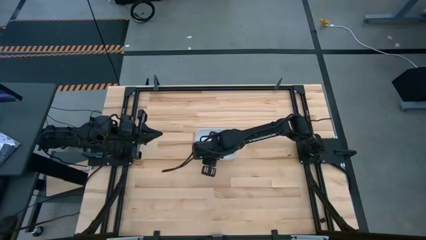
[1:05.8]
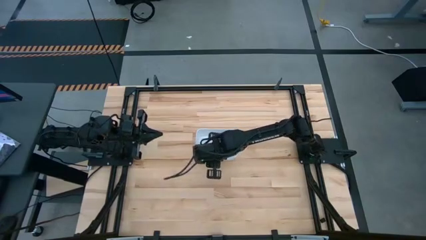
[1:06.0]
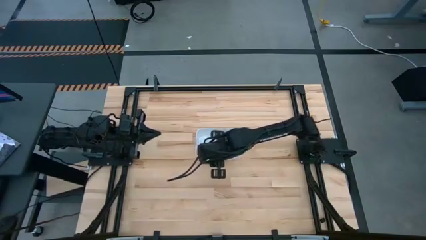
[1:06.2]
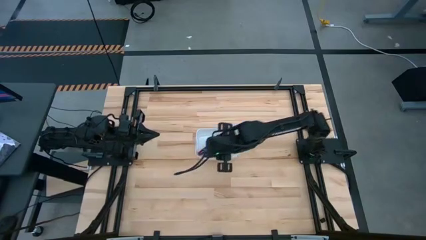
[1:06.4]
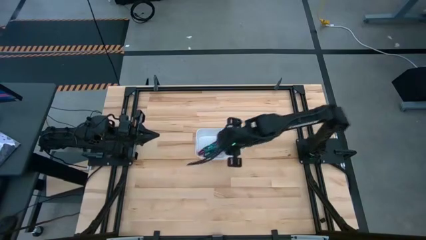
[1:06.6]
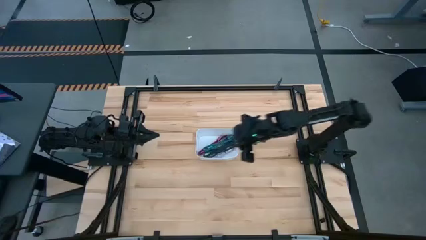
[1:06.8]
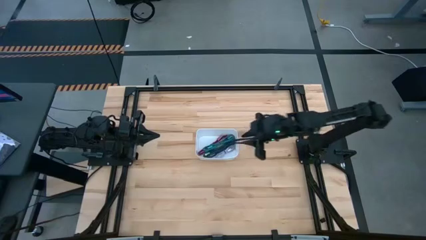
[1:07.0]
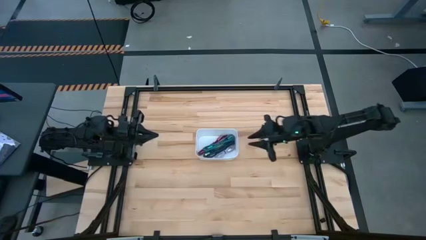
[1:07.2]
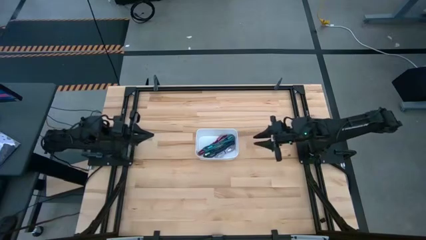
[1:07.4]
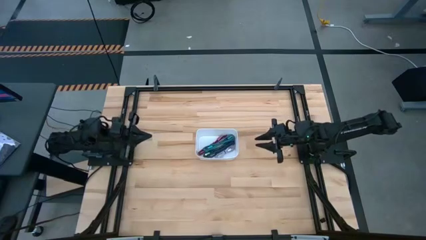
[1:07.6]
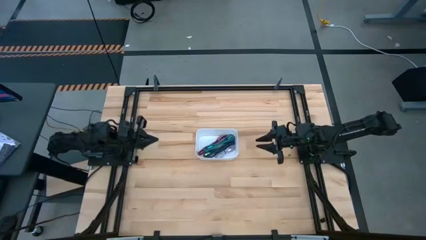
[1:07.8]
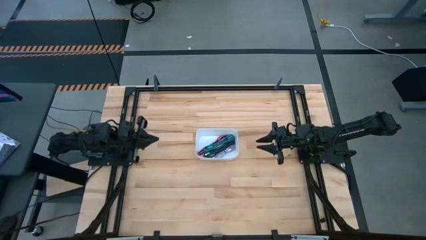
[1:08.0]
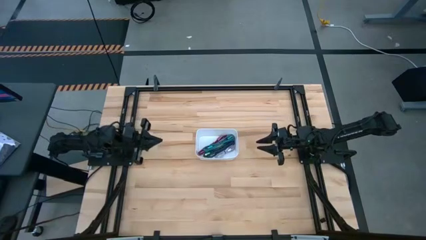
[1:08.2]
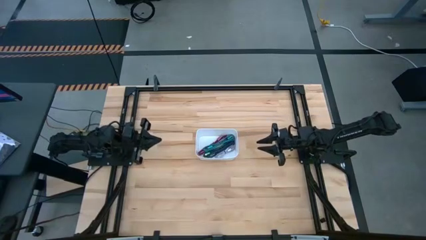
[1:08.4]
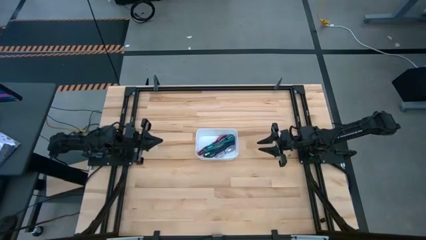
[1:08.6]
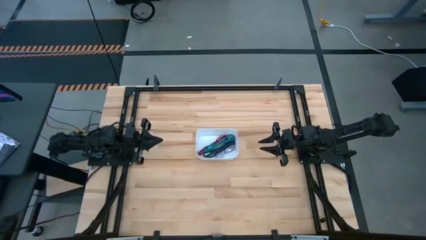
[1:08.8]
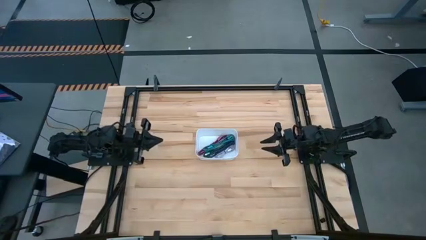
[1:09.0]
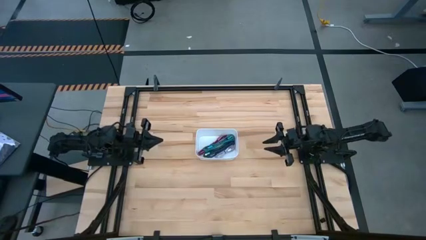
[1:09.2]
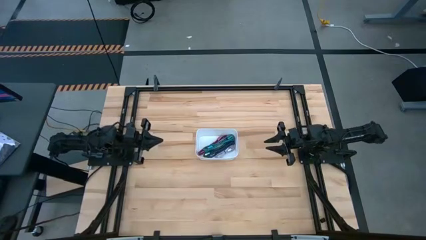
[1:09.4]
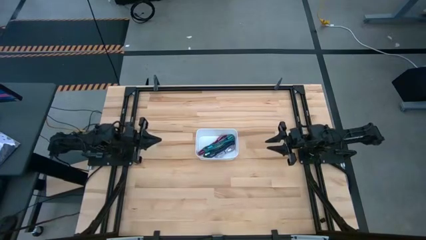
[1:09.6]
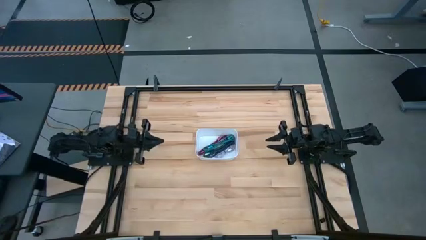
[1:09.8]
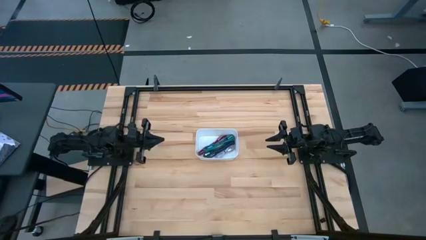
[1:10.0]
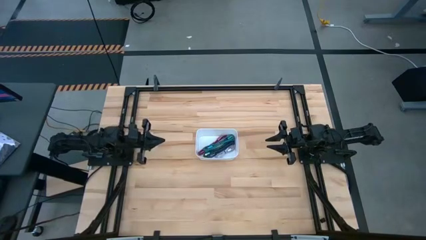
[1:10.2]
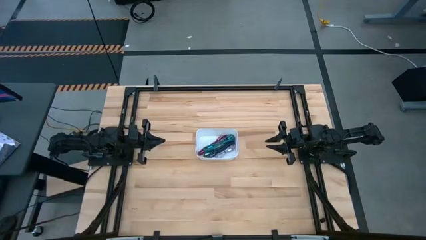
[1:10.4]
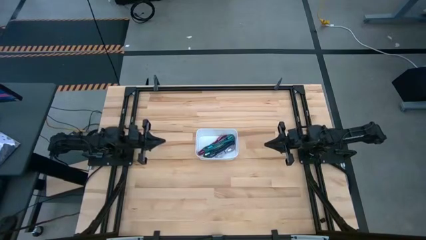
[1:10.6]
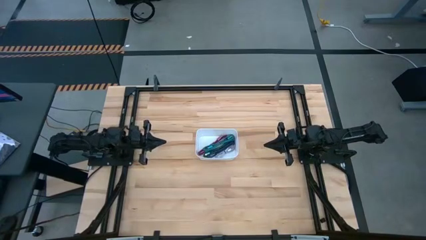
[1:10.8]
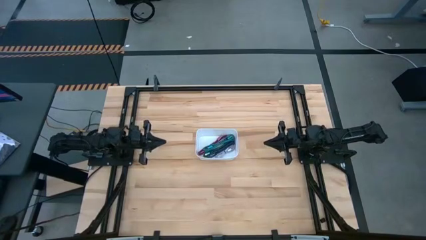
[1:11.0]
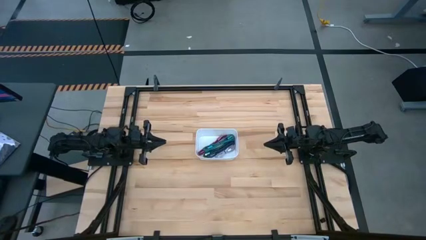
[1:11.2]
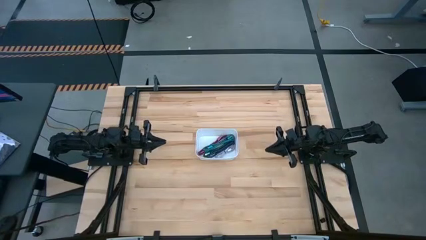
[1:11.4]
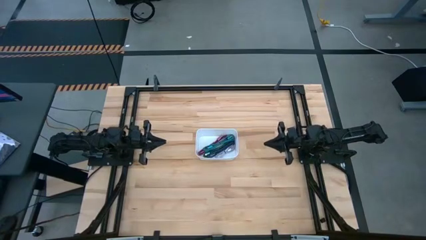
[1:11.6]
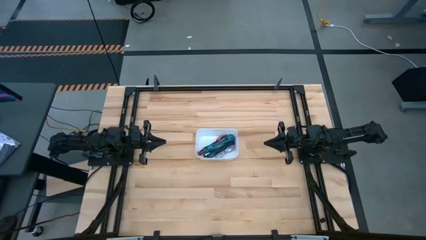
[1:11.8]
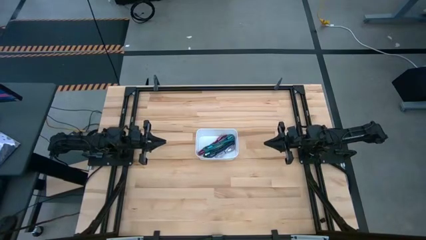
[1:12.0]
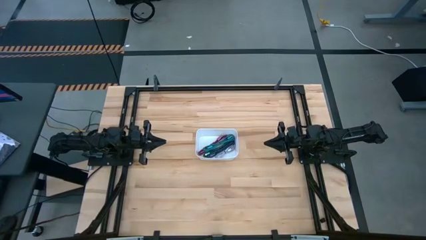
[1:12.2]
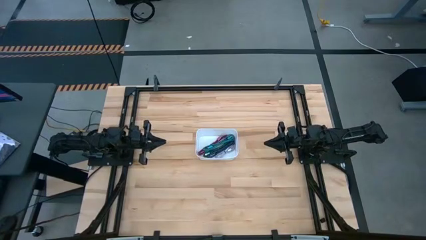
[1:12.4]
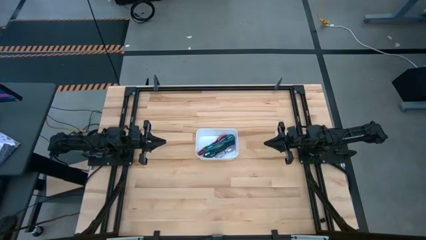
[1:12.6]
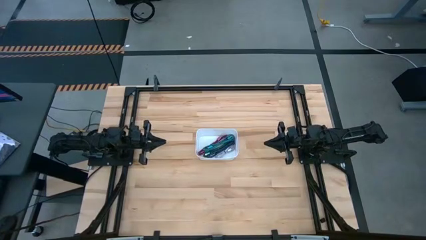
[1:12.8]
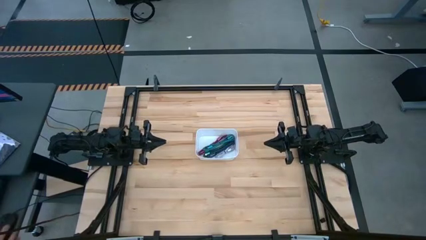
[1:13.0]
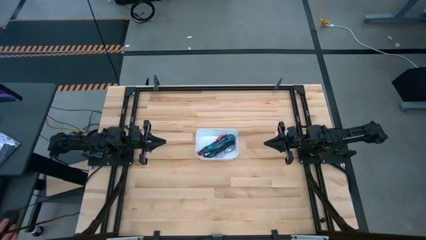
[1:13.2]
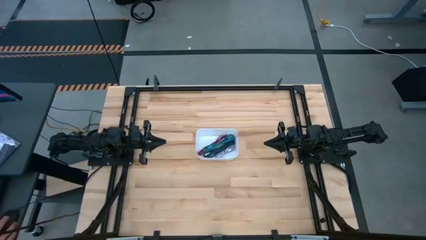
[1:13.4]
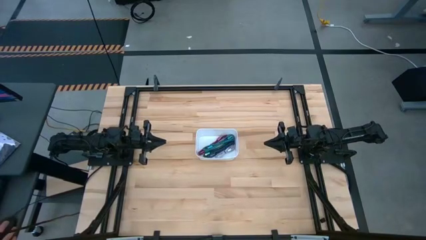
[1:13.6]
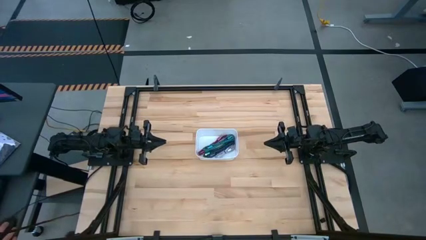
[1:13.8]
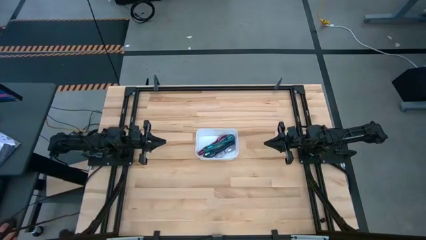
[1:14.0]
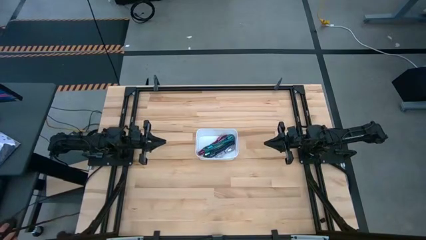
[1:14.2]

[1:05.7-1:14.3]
Task: Pick and place USB-C Cables
Return to Home Position

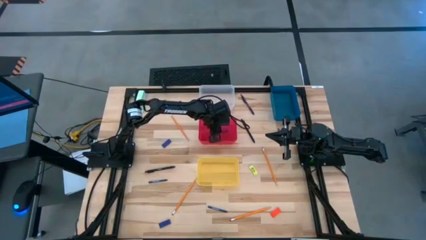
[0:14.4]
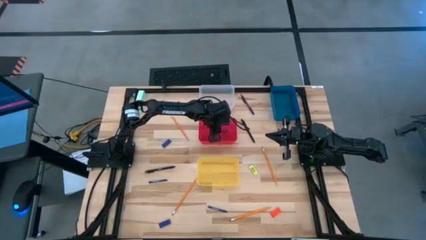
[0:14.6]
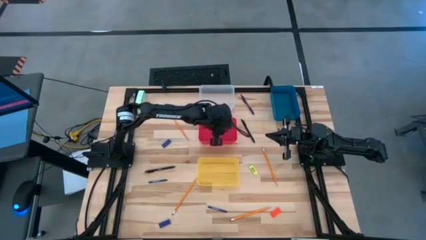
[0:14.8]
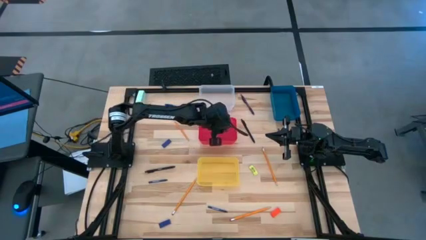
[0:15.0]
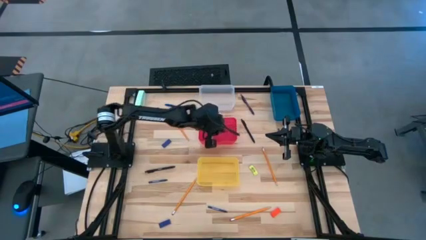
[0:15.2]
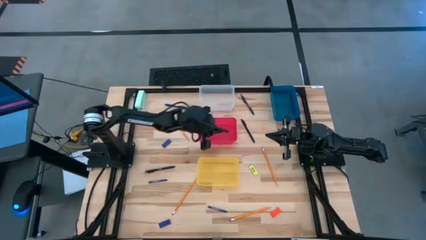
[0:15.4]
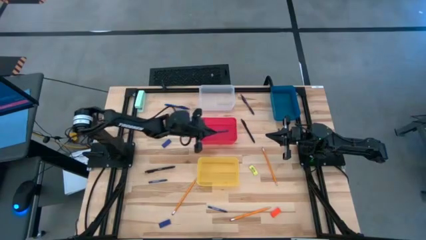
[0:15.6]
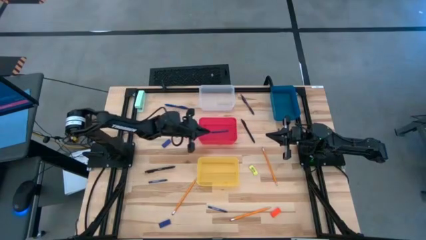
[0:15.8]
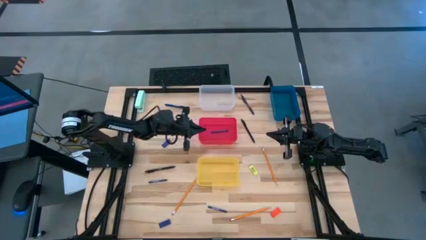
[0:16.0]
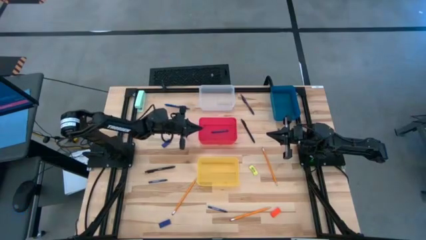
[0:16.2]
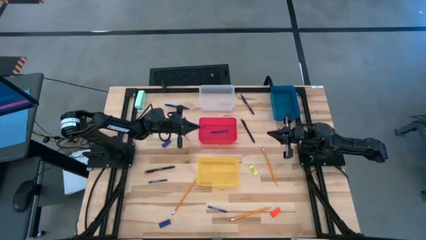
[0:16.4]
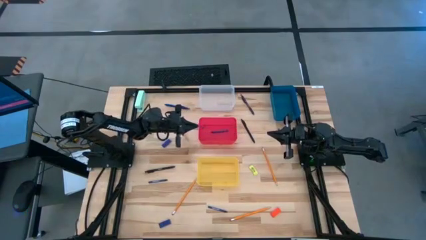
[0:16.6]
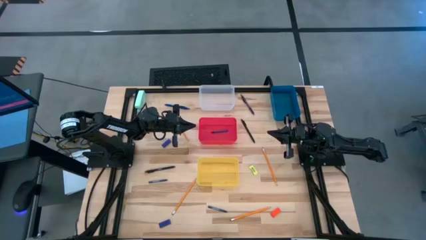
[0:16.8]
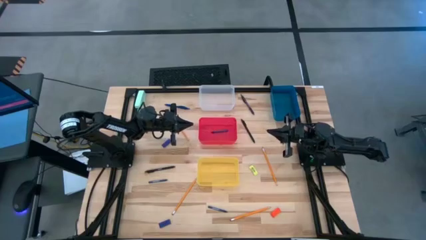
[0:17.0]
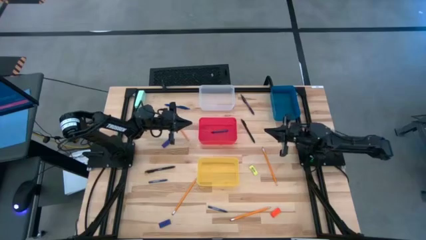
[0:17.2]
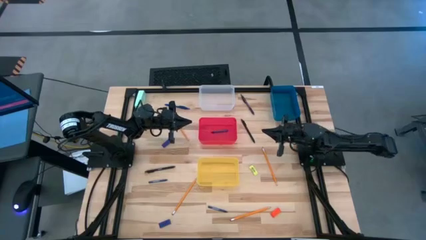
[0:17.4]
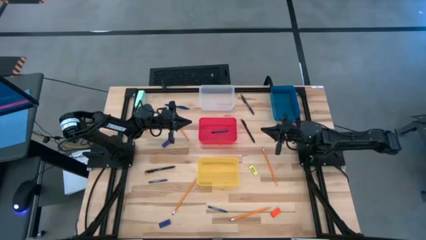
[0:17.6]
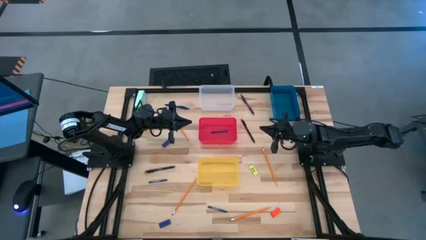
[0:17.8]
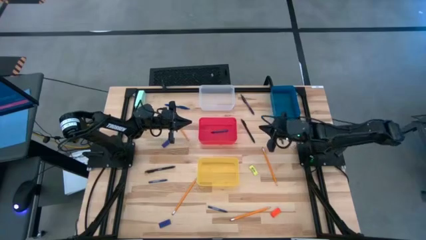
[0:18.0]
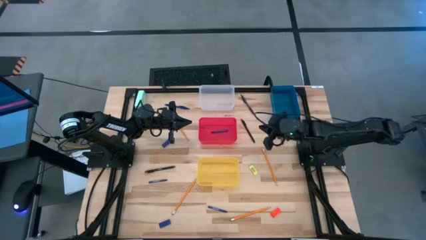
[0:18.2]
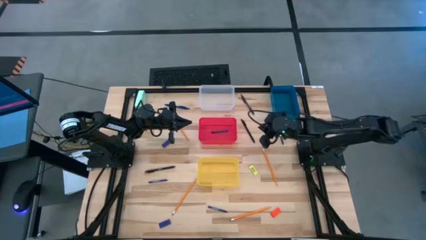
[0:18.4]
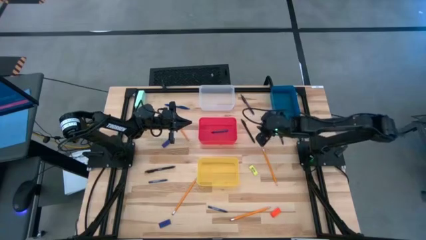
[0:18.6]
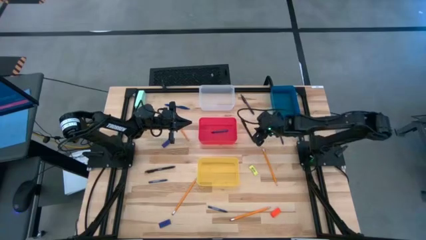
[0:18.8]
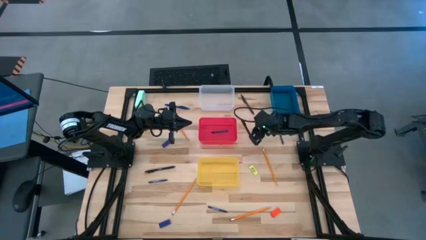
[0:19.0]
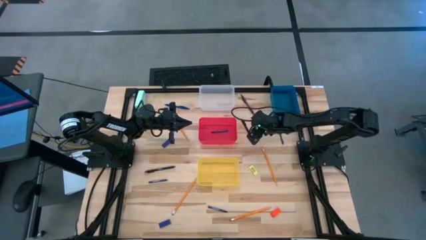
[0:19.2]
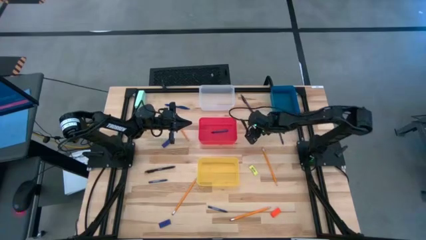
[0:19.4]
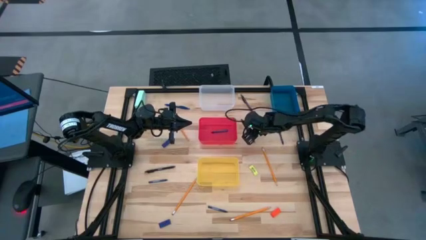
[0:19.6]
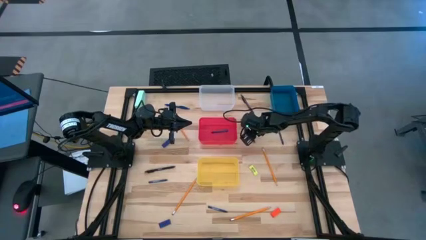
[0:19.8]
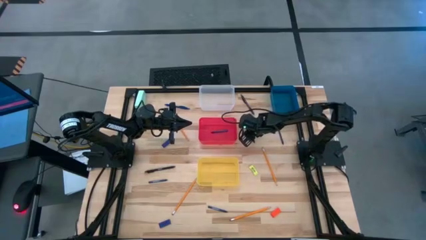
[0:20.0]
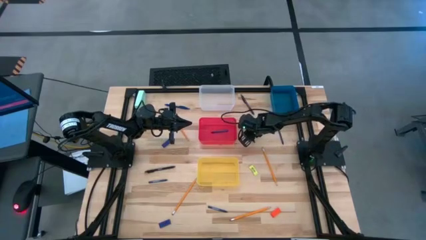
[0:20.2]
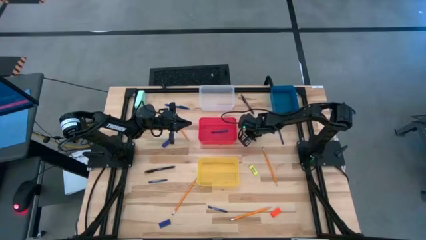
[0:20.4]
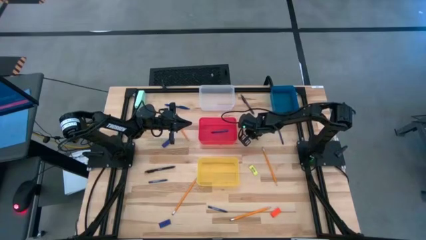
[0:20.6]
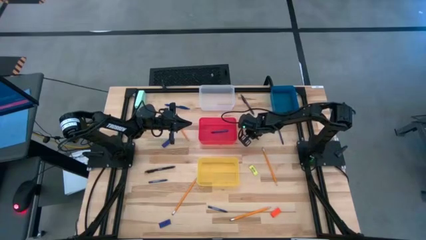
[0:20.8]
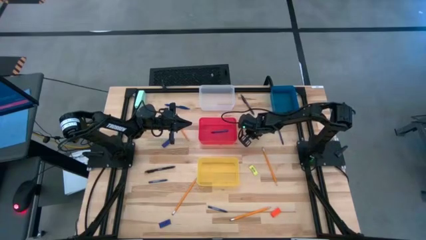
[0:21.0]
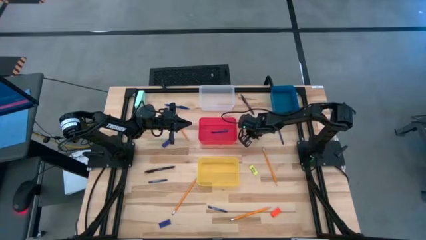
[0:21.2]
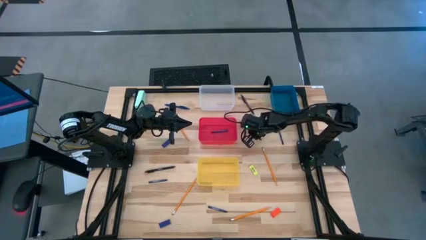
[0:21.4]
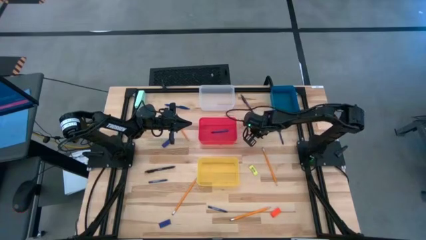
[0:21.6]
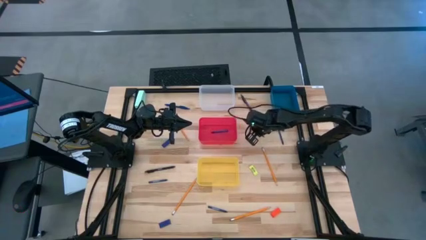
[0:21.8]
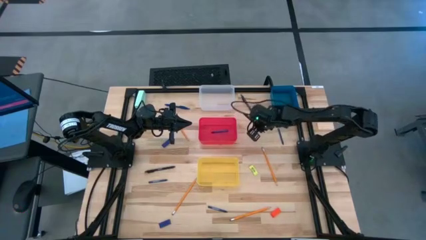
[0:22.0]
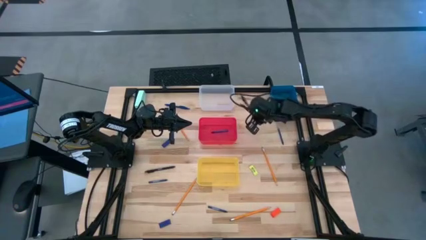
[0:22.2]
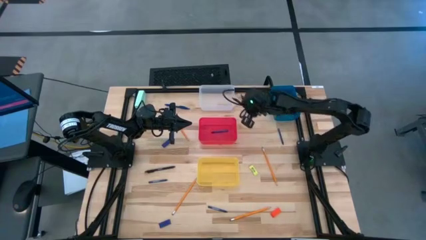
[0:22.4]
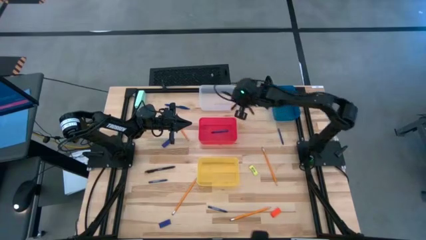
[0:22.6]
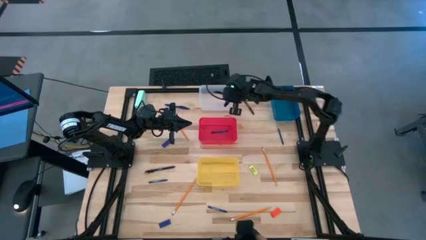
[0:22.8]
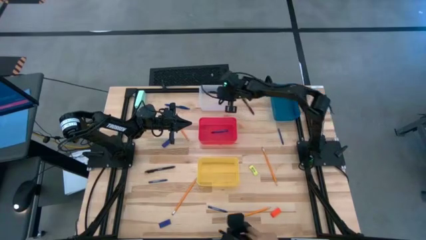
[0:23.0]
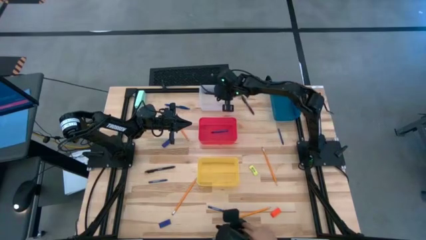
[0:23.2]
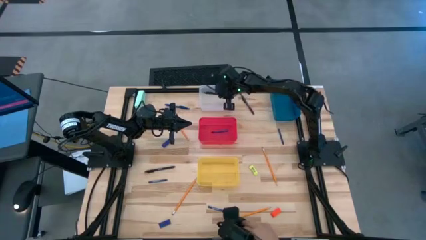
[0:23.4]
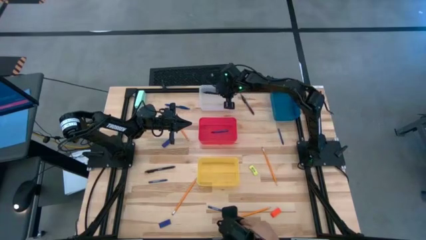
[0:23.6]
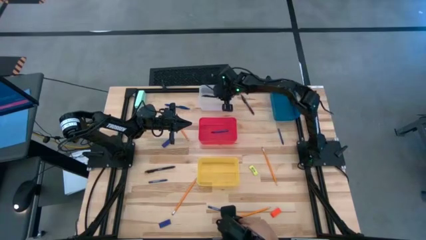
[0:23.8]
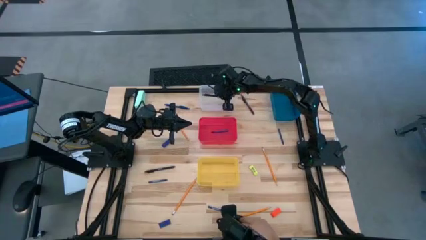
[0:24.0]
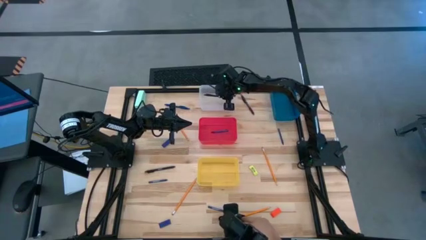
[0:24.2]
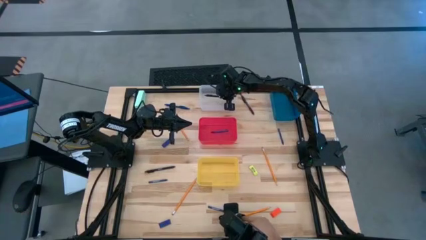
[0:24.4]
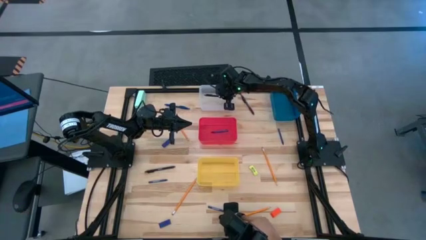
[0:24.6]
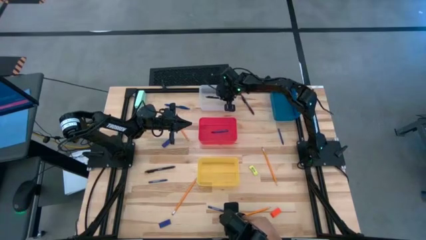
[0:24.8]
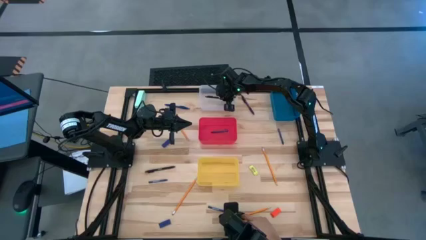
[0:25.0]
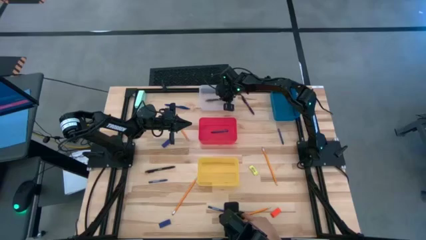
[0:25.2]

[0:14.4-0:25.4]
Task: Sort crayons/erasers/pens/pencils in bins
Put the middle right black ballpen into the transparent bin
